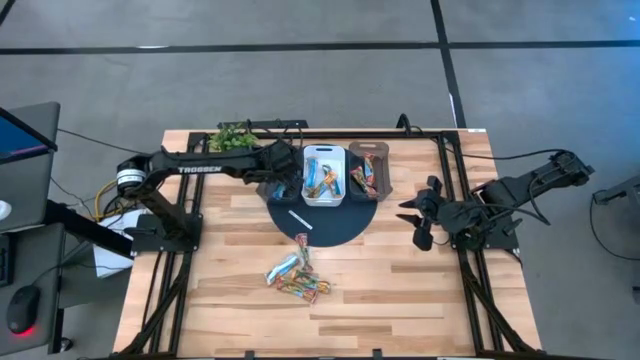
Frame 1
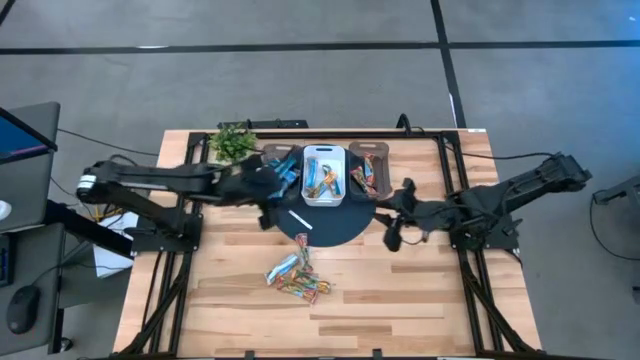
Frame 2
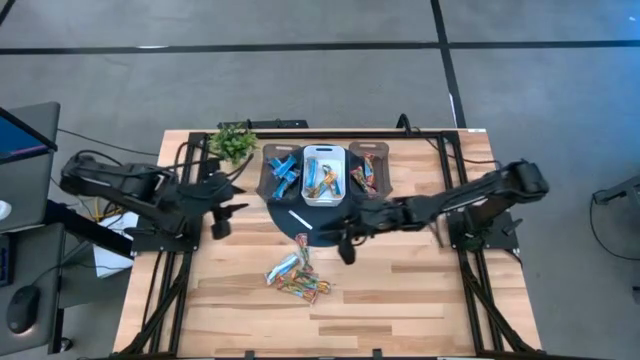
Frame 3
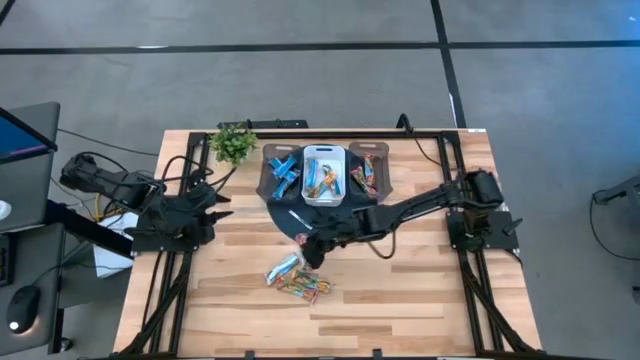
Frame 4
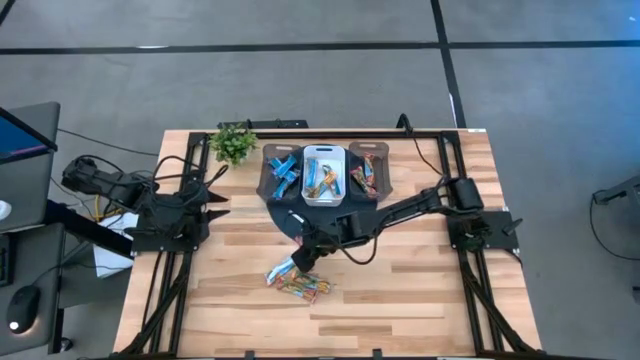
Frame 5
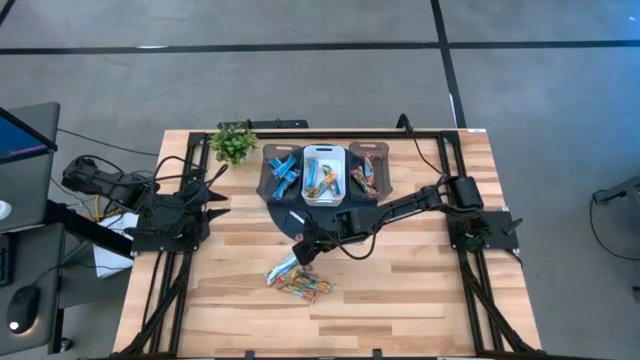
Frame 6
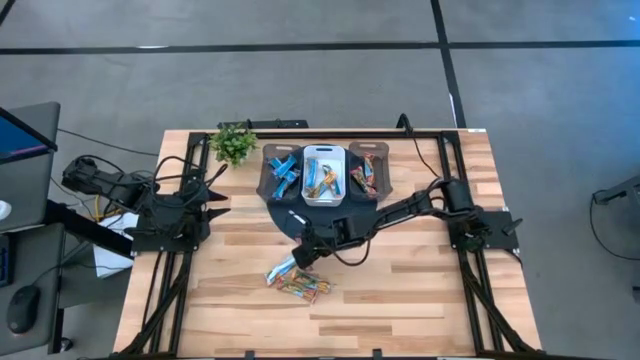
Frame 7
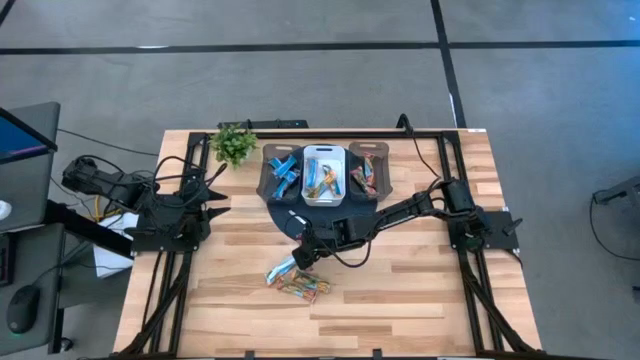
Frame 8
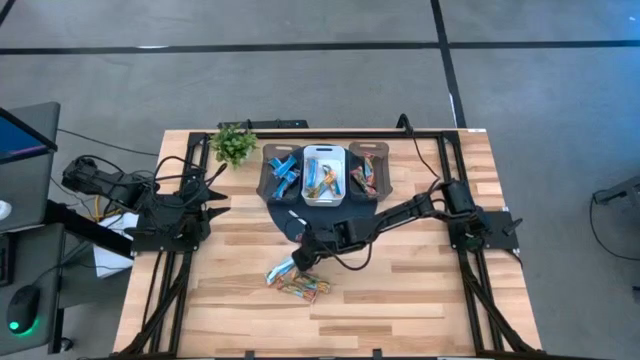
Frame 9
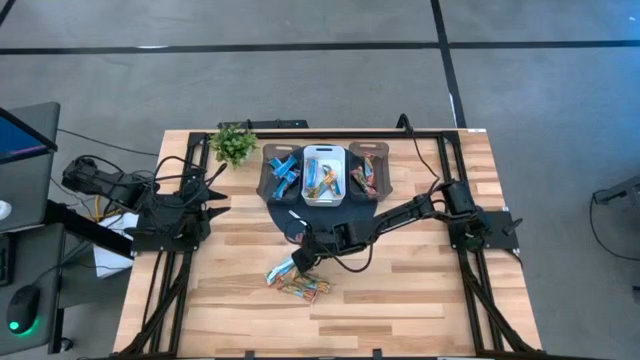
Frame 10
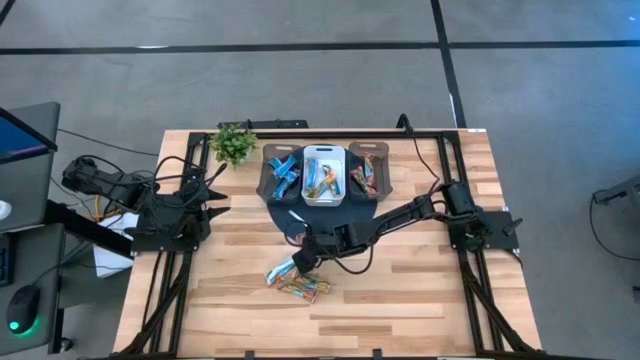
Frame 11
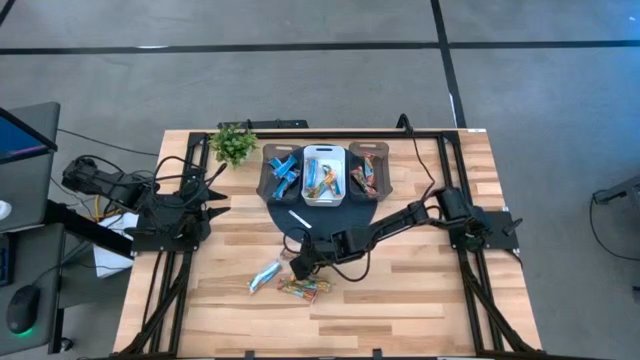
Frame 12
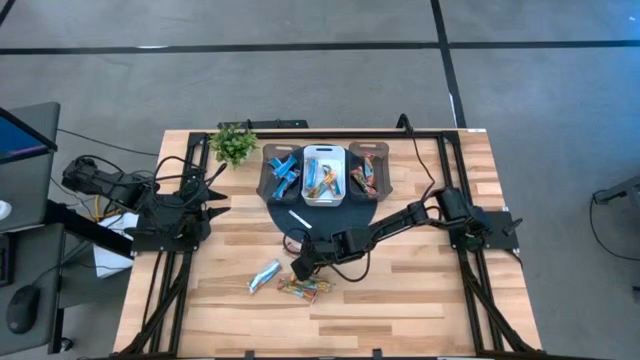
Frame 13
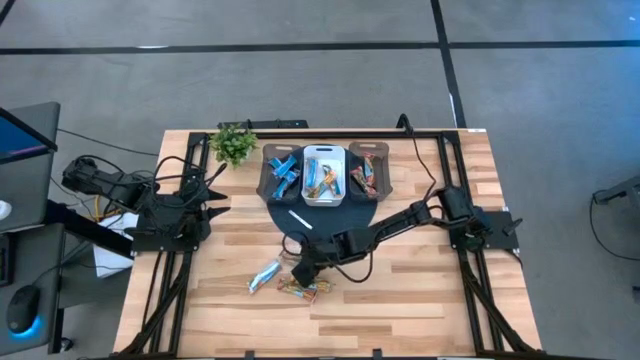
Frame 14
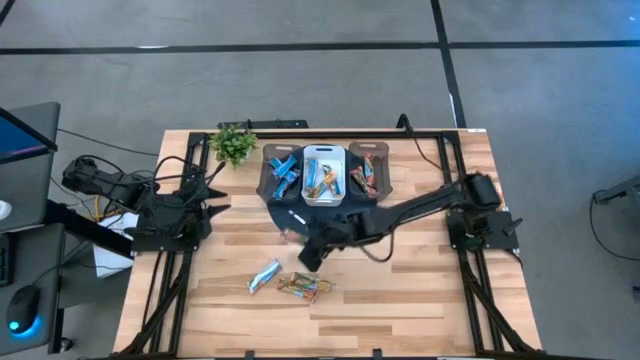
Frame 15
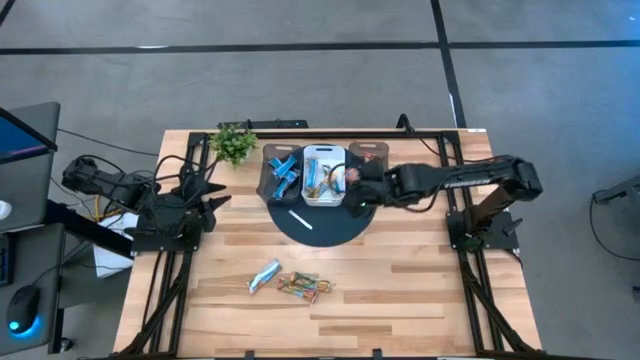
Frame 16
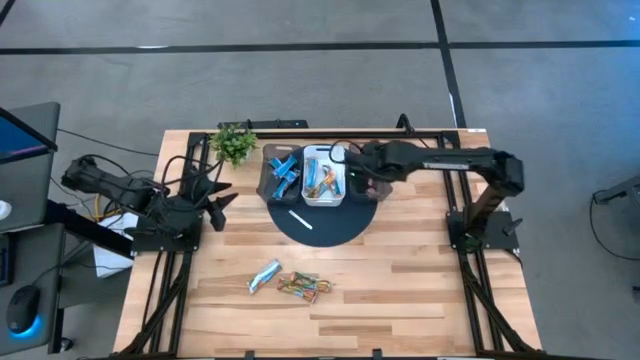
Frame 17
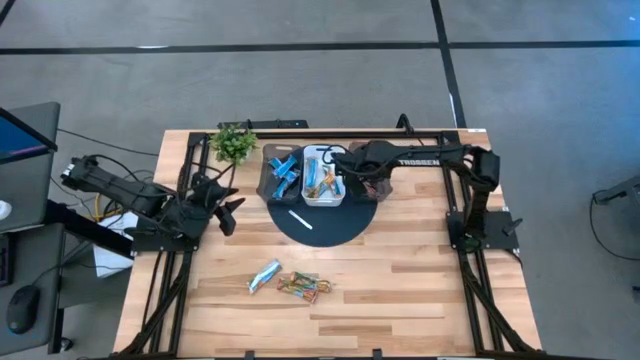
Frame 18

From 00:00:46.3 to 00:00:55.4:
Task: Pick and place Granola Bars by type
Put the red granola bar into the right black bin

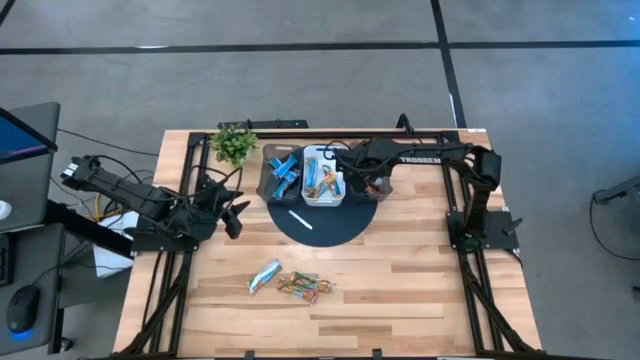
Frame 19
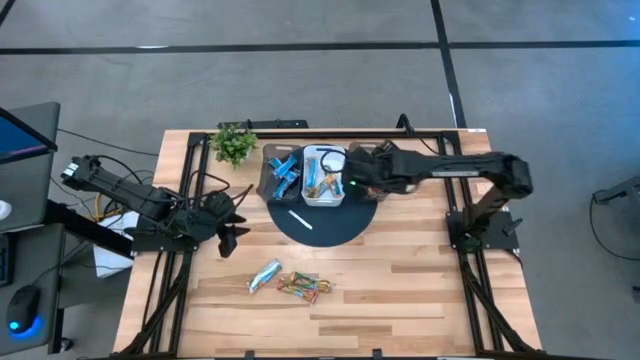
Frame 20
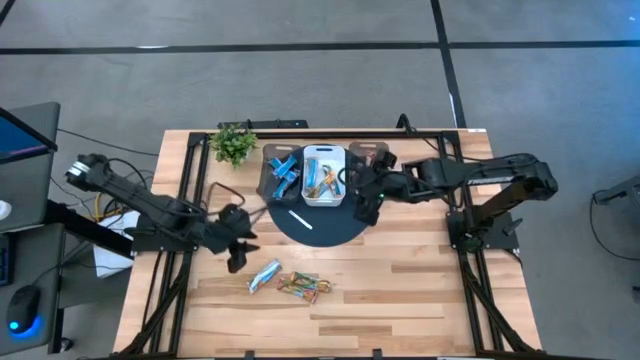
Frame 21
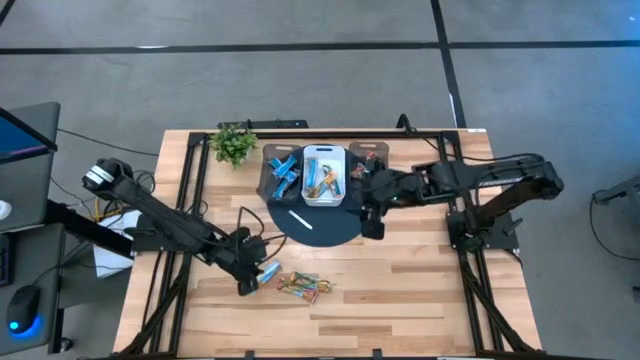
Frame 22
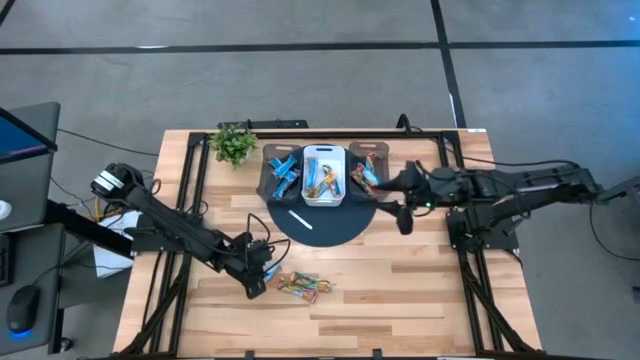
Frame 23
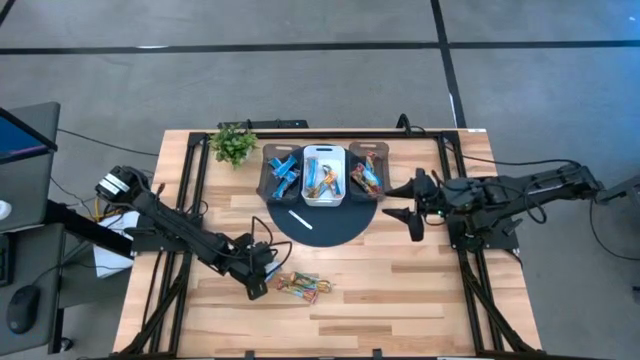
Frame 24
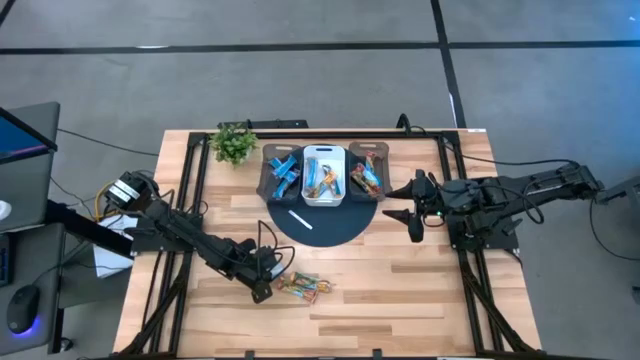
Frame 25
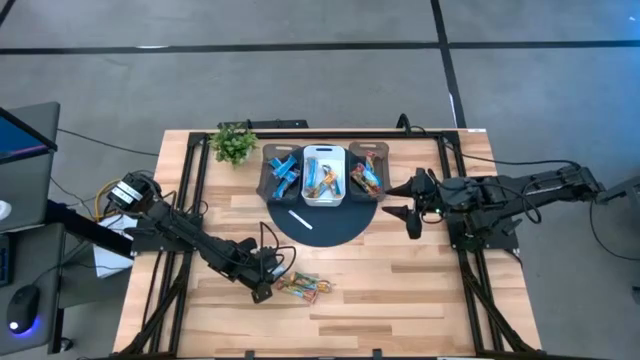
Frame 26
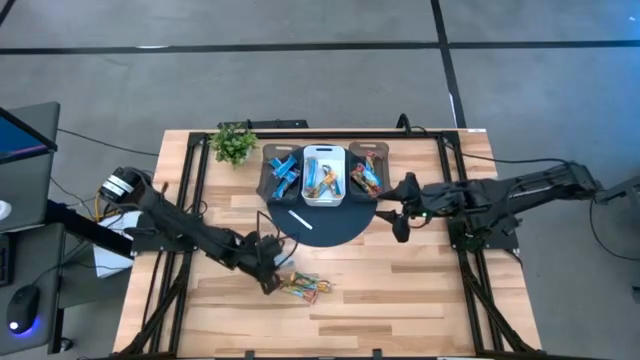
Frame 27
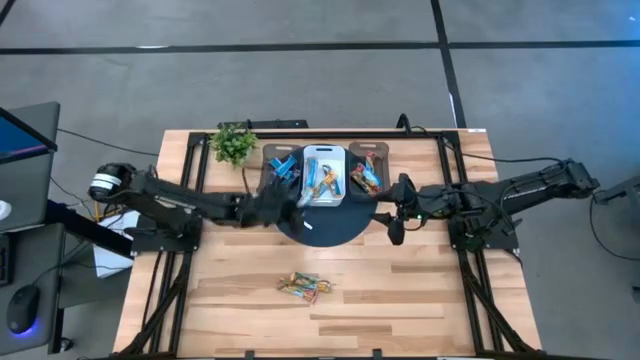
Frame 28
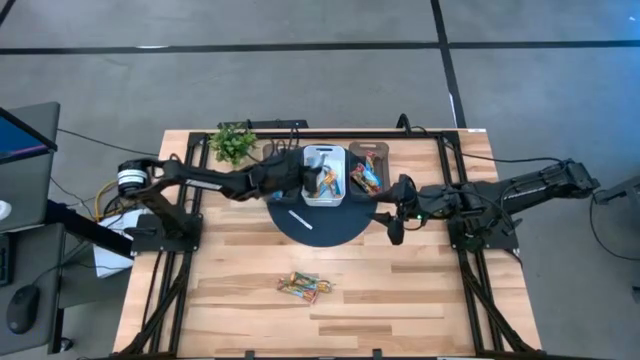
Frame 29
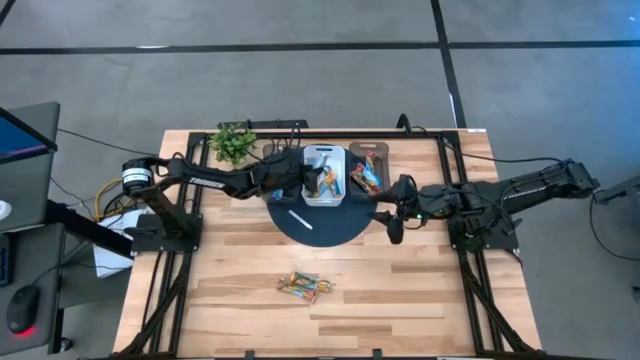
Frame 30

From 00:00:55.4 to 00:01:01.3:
Put the orange granola bar into the white bin

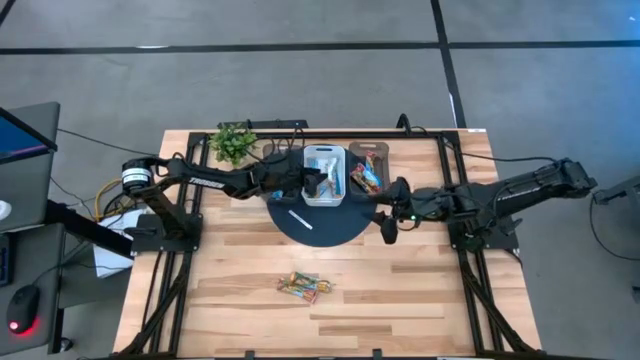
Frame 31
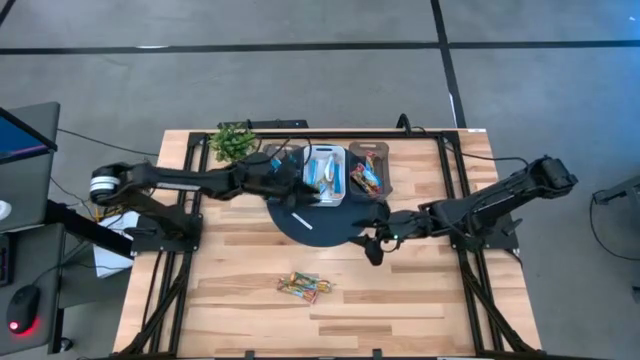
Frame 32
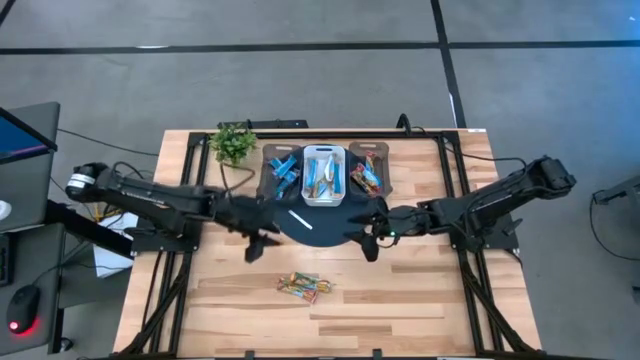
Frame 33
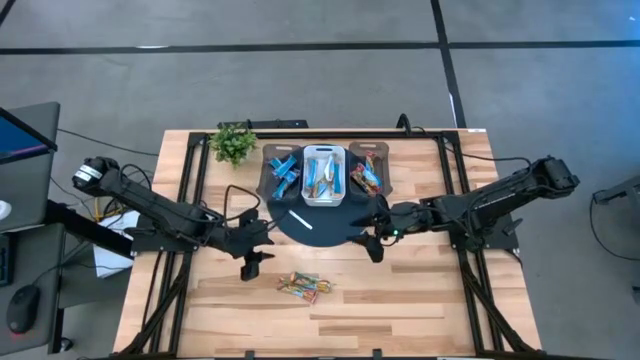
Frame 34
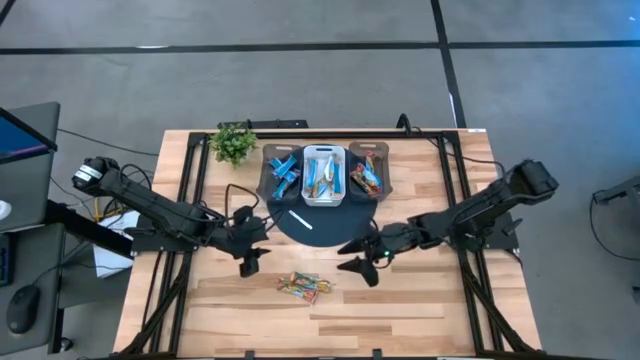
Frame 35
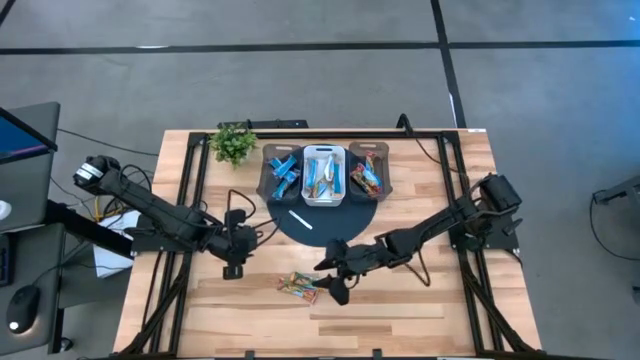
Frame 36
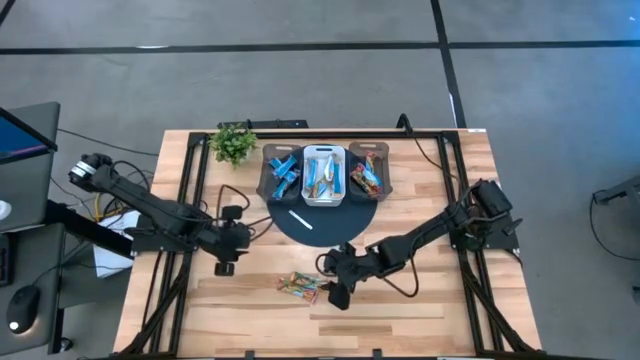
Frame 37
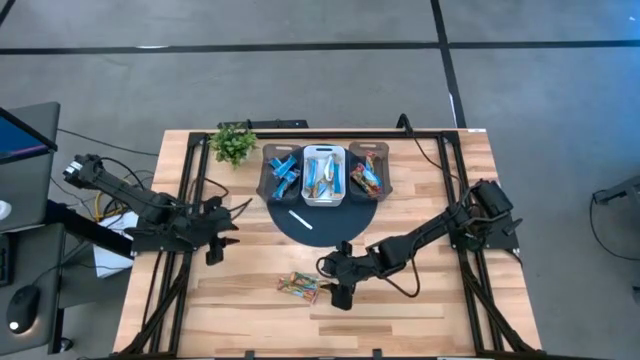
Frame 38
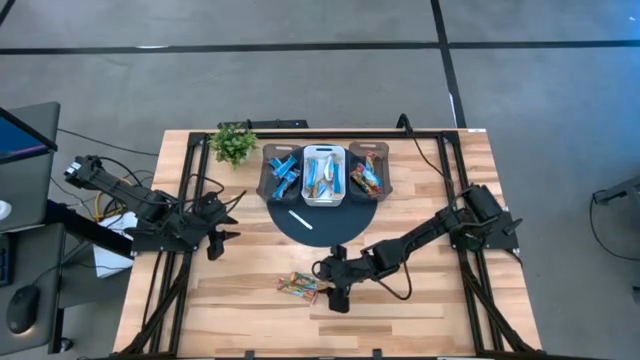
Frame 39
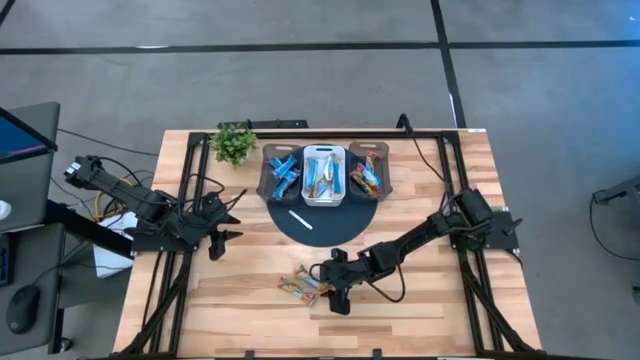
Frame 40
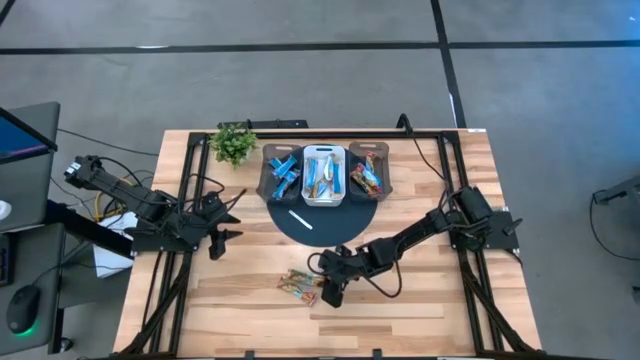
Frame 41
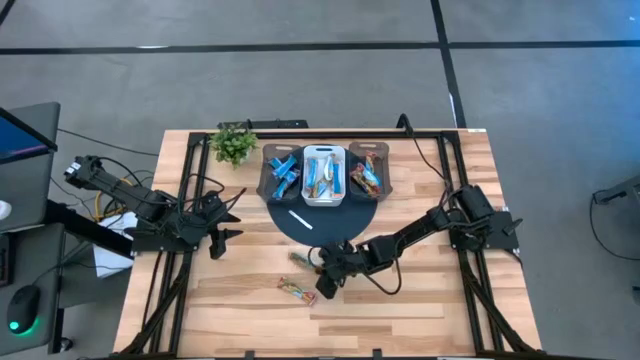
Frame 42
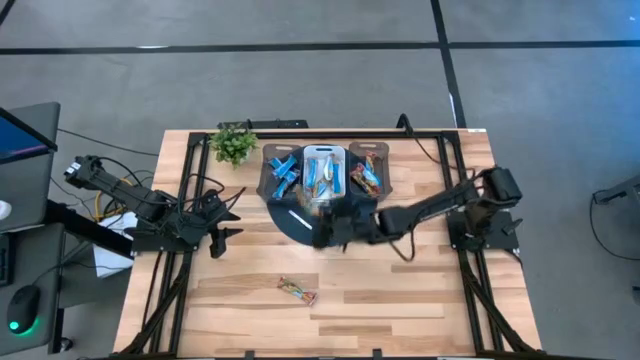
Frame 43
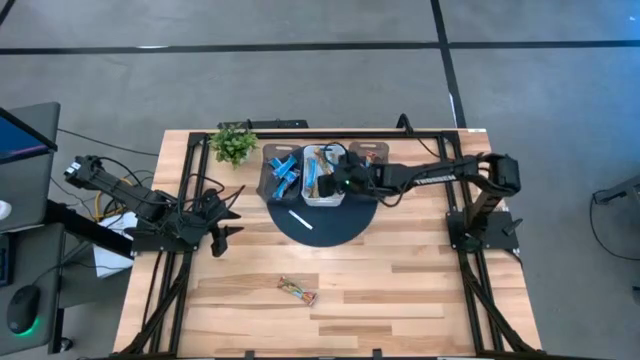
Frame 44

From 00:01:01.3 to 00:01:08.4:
Put the orange granola bar into the white bin
